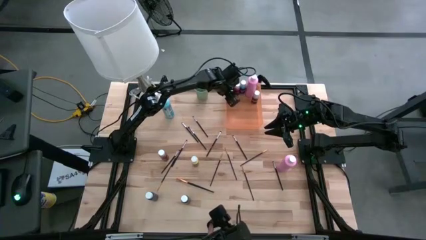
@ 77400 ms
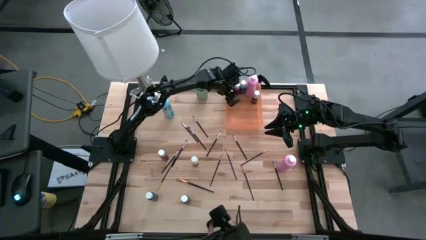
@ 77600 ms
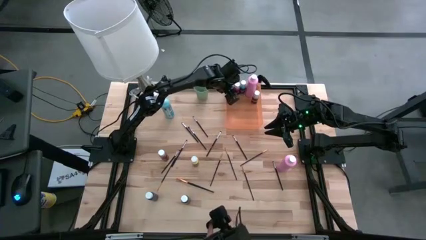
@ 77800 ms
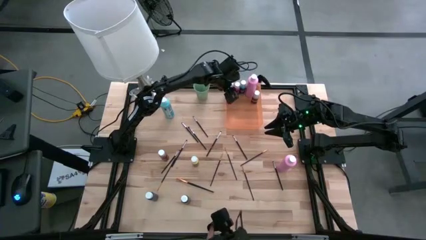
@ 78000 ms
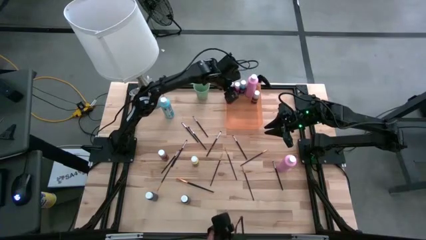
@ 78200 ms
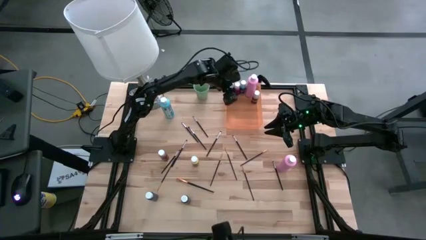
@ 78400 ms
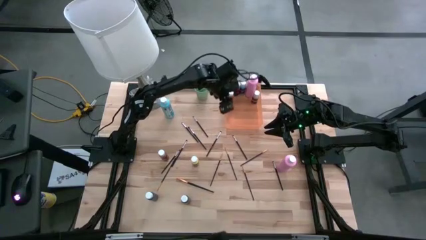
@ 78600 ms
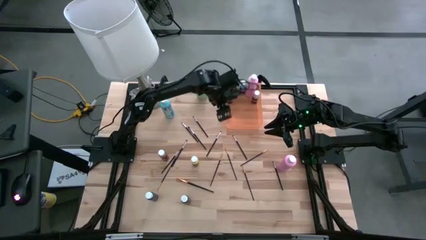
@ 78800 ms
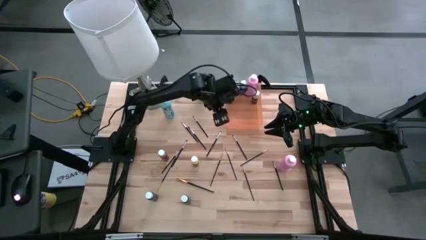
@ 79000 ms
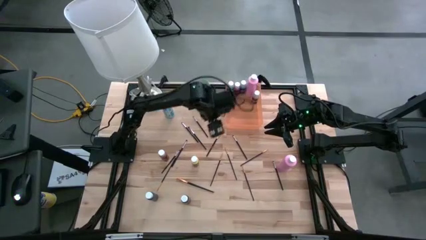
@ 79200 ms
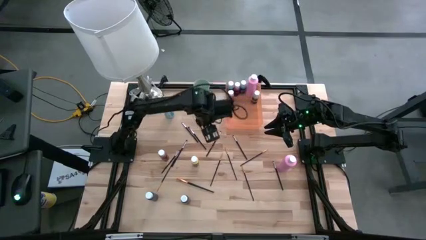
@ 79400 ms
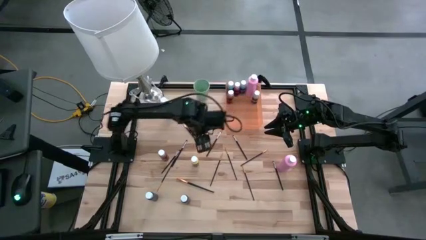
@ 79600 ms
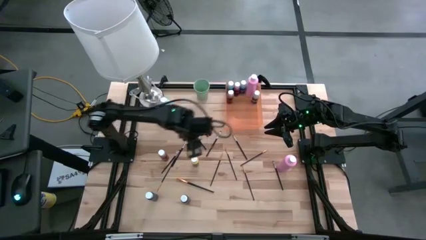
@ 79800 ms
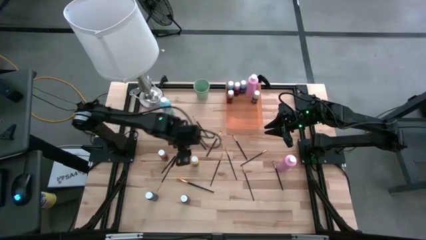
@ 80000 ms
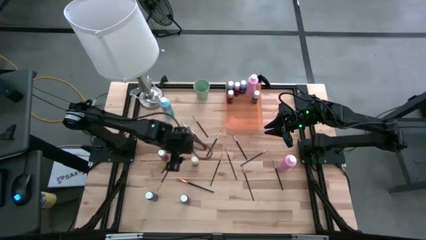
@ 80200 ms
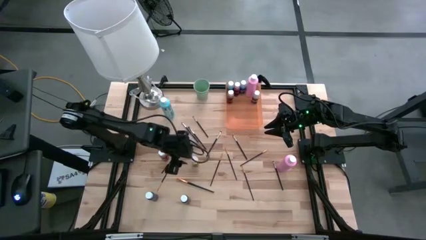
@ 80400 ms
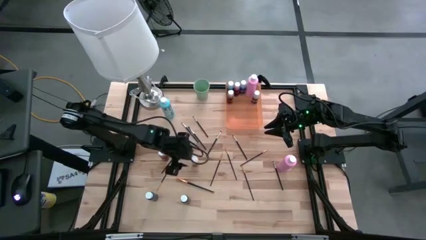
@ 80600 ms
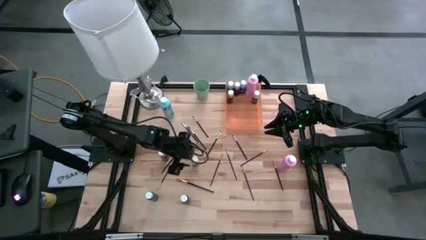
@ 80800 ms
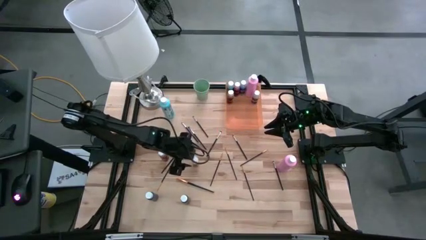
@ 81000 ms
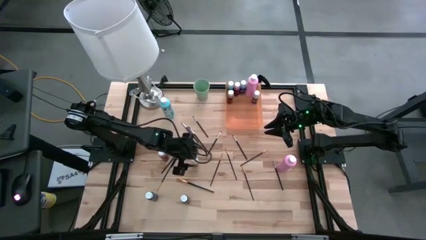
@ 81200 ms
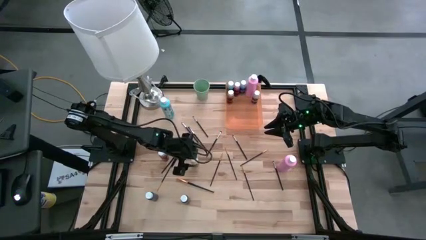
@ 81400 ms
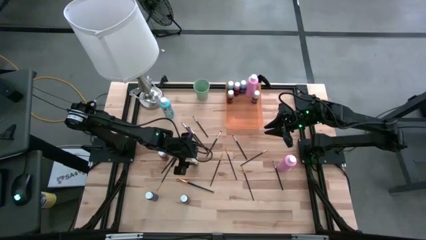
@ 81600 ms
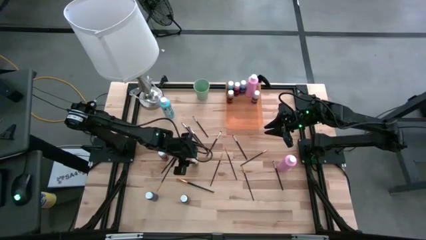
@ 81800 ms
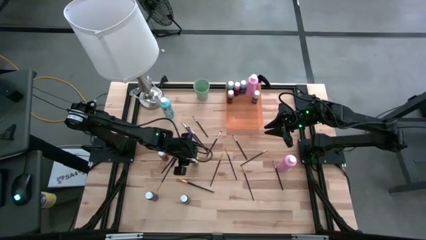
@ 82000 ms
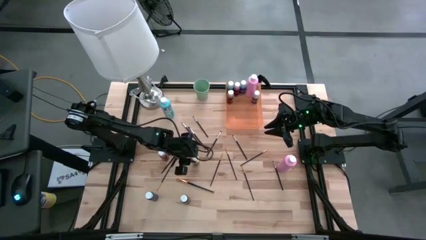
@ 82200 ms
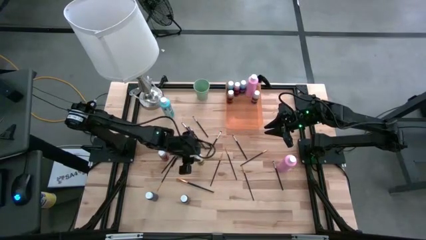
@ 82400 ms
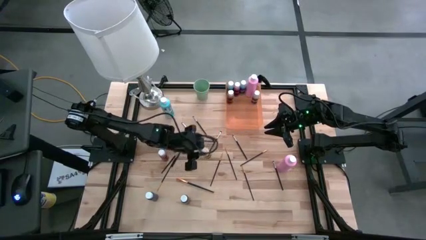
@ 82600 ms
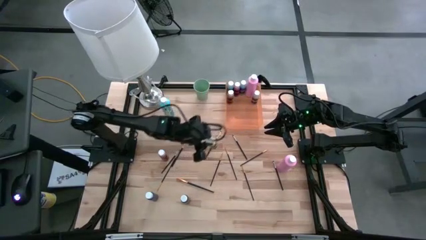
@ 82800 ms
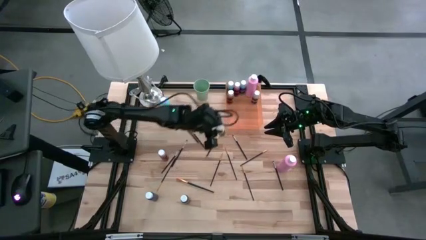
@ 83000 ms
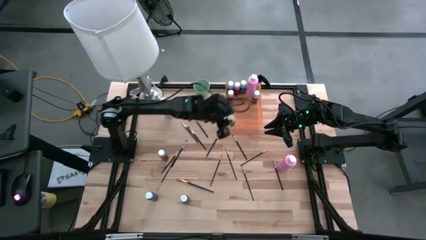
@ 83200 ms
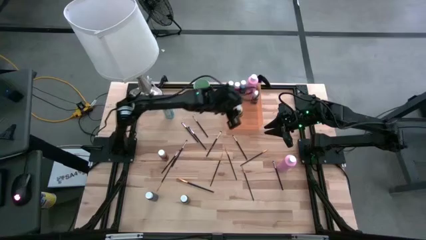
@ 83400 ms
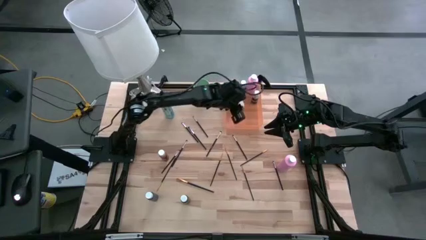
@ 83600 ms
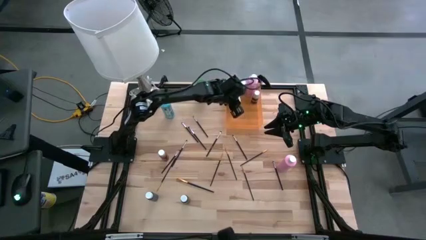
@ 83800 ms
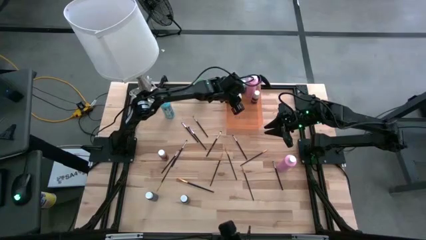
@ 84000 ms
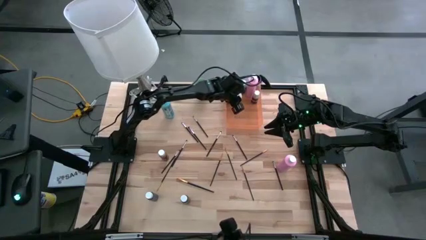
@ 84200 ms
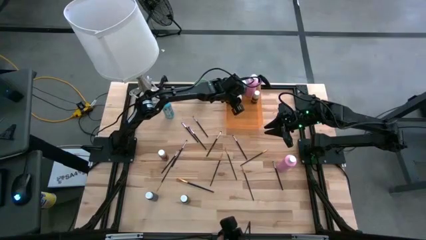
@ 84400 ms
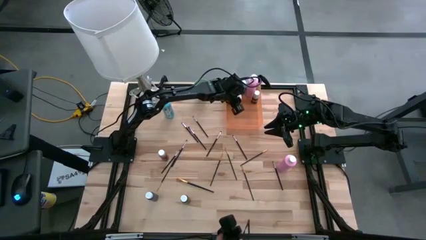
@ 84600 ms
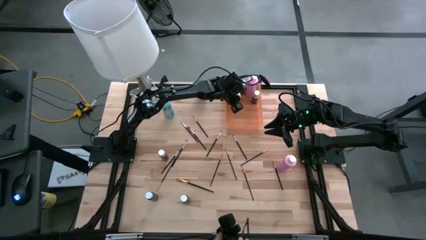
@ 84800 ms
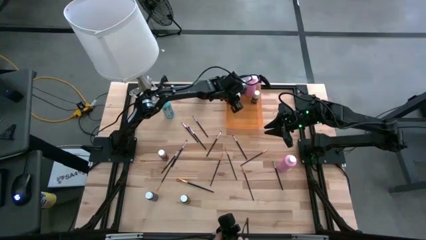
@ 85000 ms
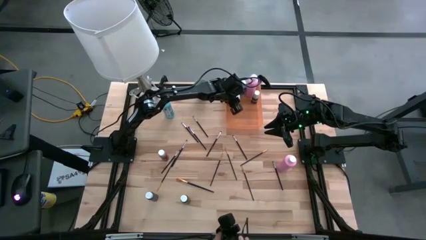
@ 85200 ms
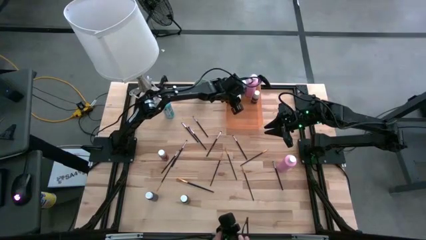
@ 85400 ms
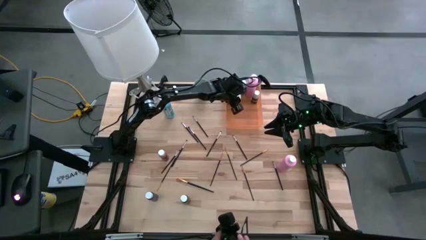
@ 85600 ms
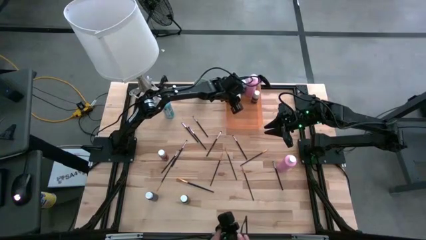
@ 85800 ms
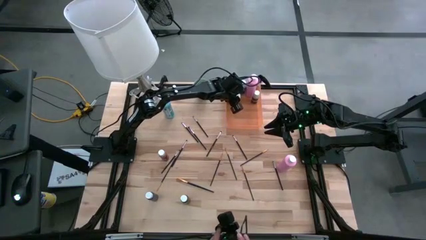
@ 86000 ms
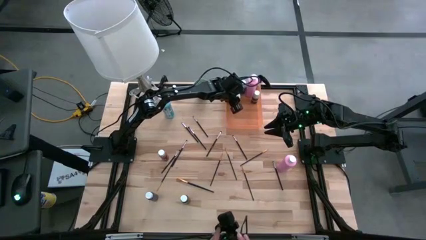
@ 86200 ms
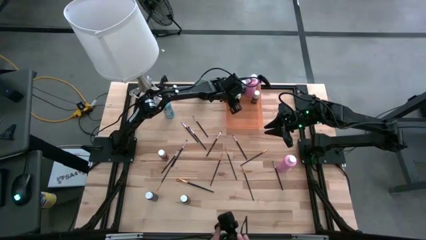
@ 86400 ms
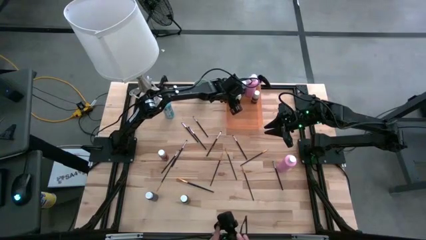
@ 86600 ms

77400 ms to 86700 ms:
Task: Pick & Place Paint Supplies
Put the yellow paint bottle into the orange bin
